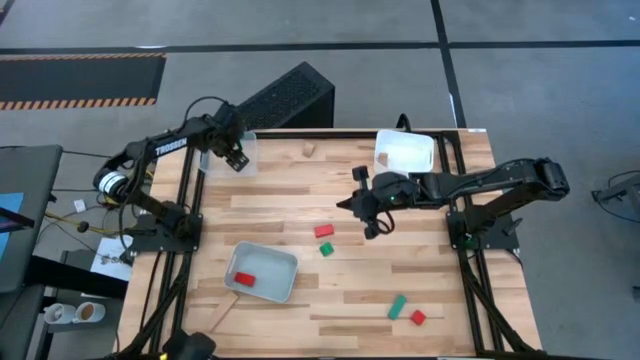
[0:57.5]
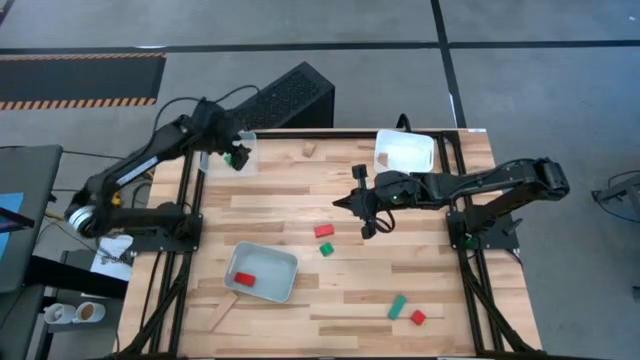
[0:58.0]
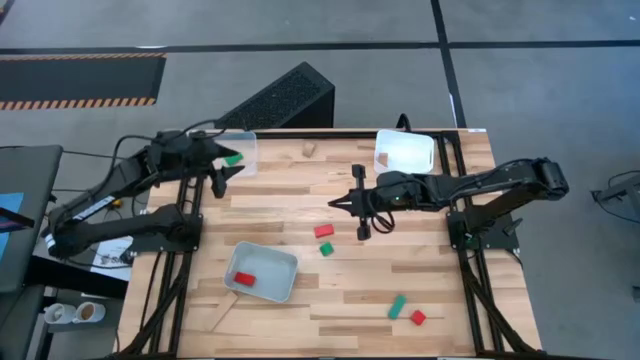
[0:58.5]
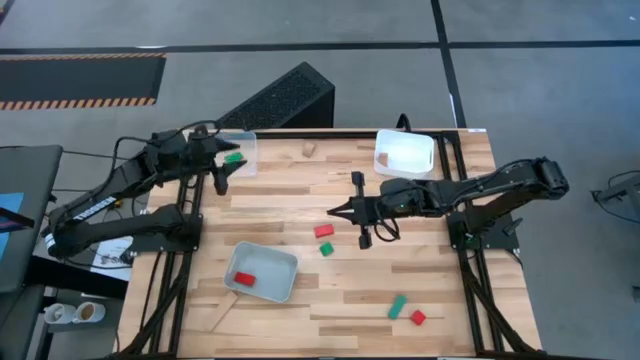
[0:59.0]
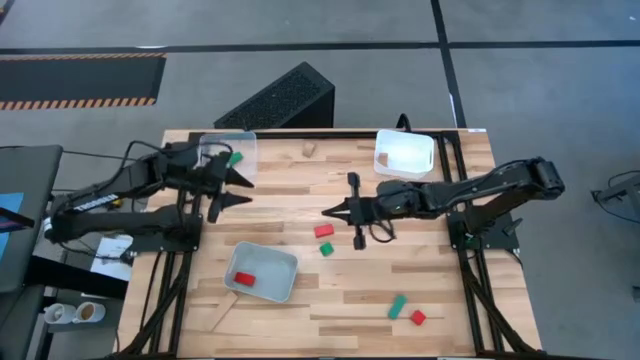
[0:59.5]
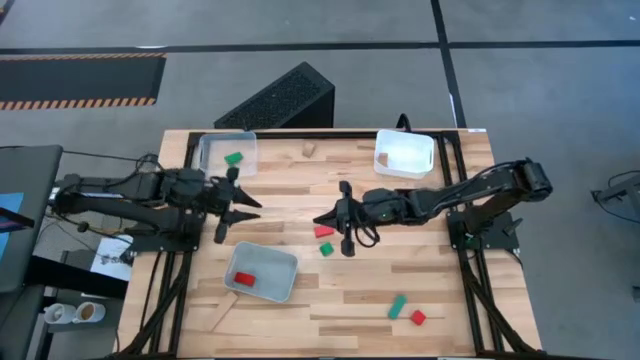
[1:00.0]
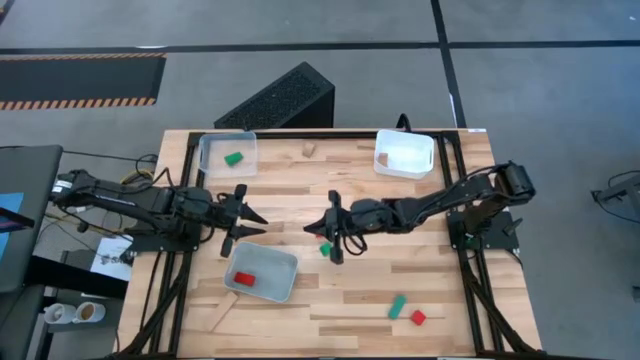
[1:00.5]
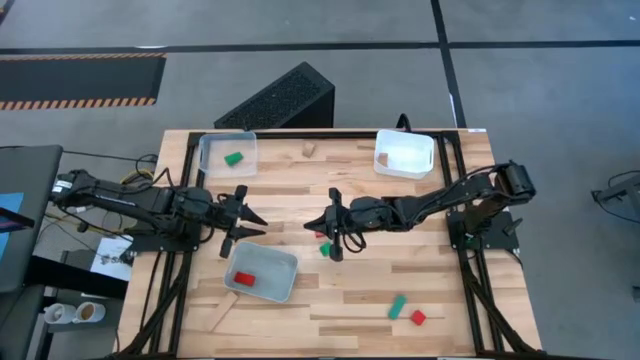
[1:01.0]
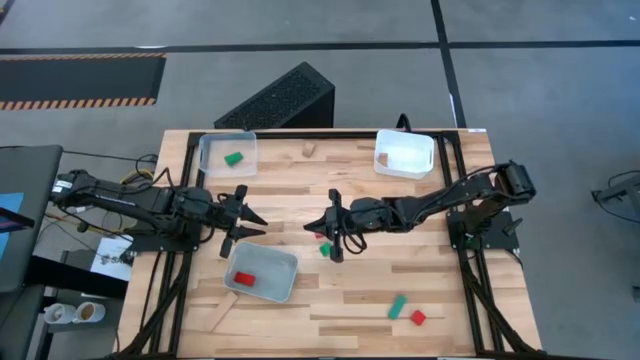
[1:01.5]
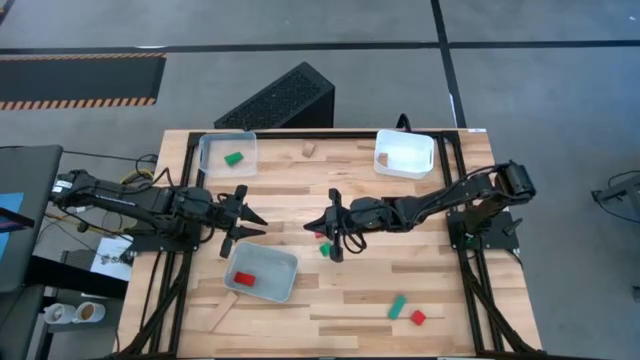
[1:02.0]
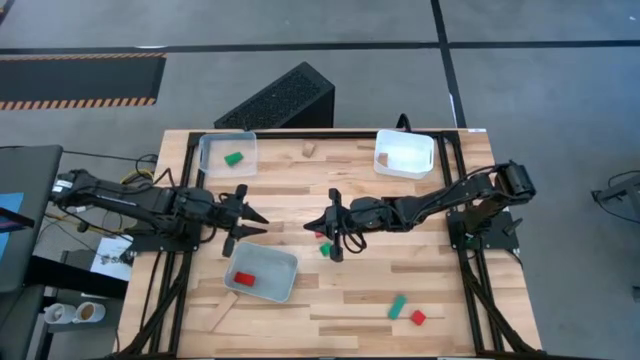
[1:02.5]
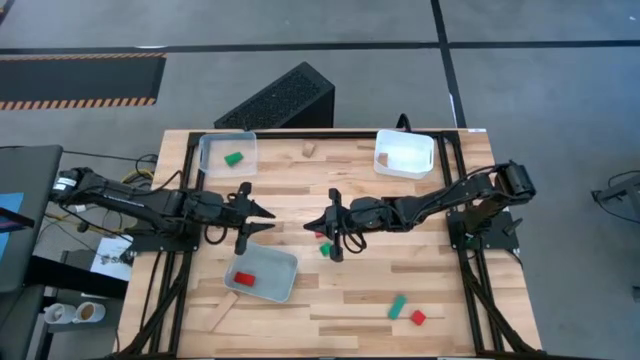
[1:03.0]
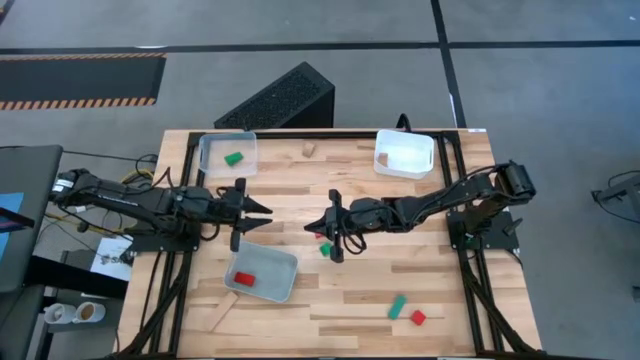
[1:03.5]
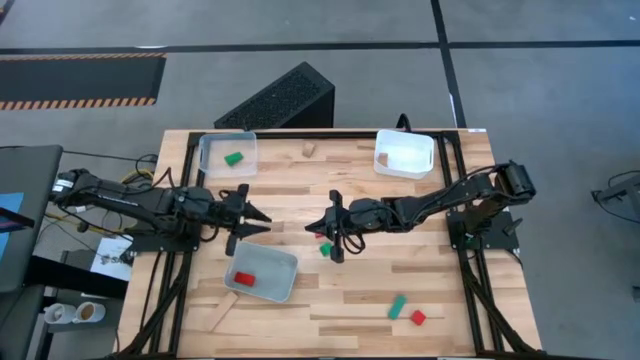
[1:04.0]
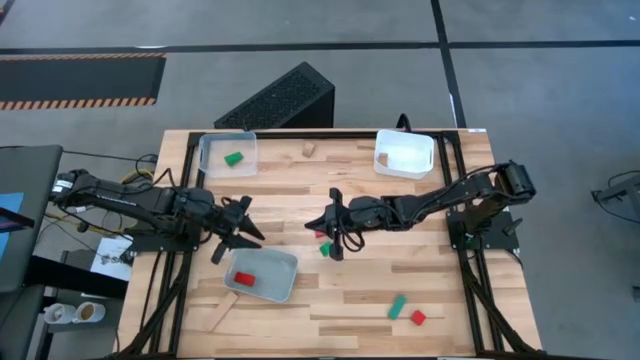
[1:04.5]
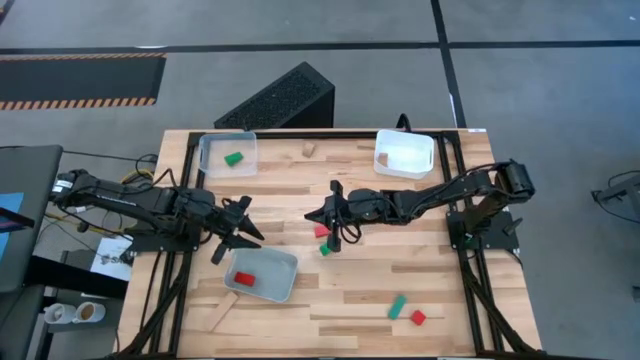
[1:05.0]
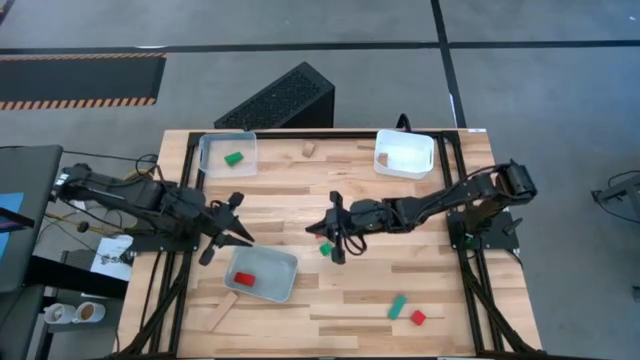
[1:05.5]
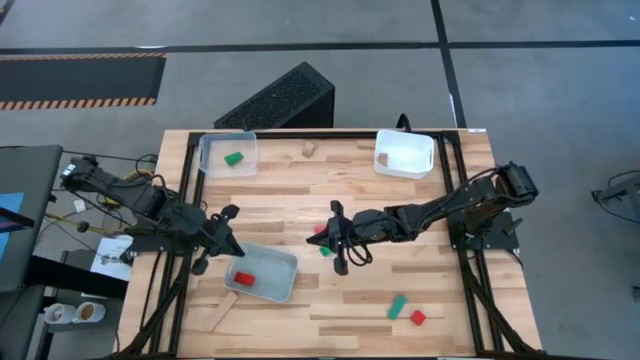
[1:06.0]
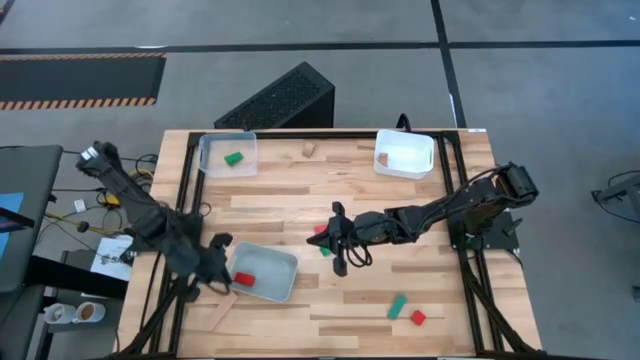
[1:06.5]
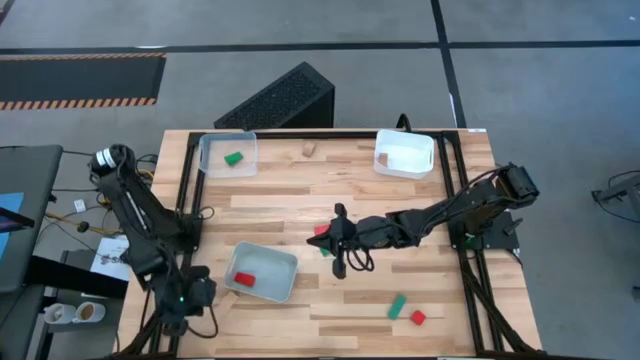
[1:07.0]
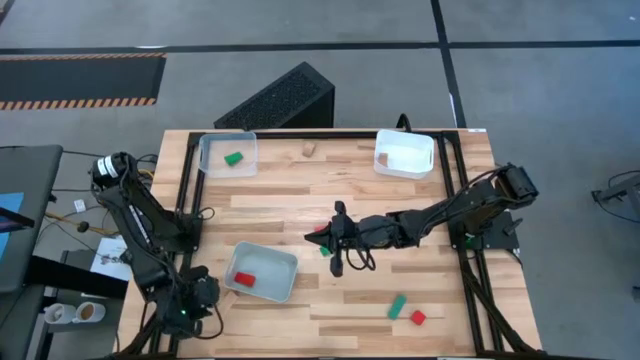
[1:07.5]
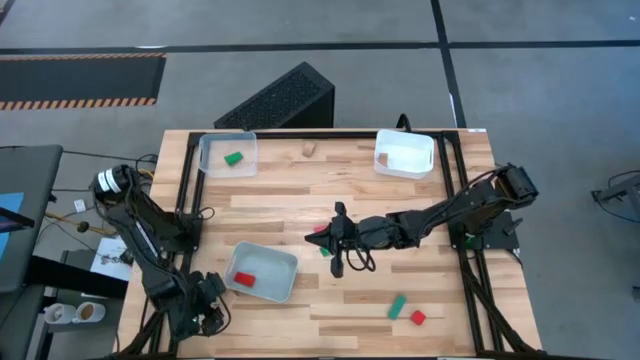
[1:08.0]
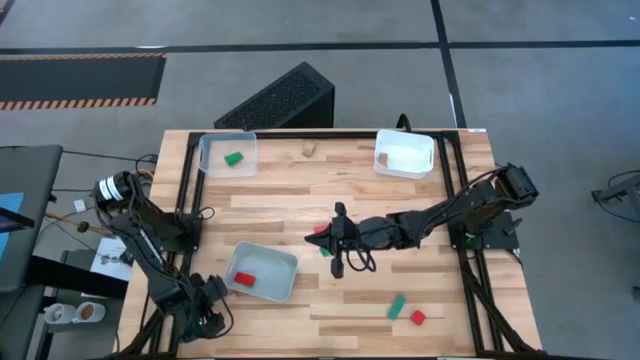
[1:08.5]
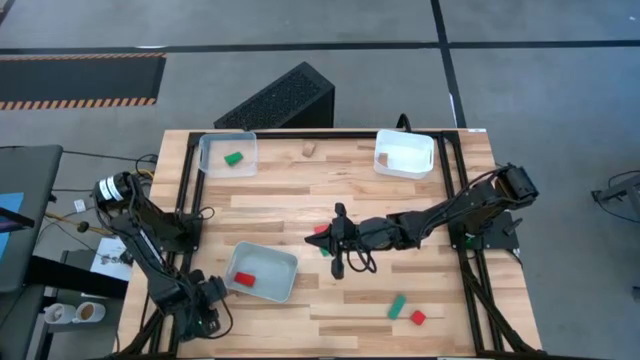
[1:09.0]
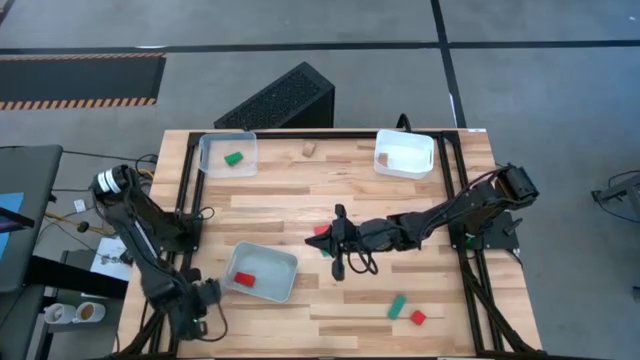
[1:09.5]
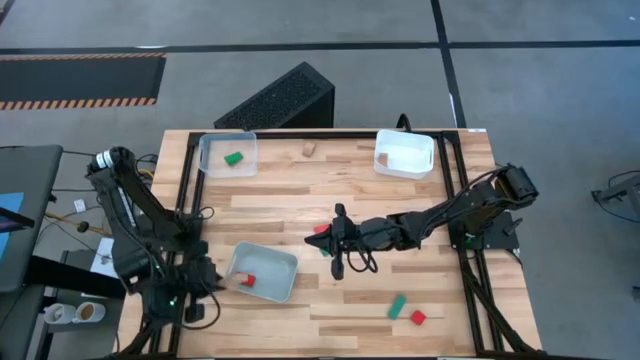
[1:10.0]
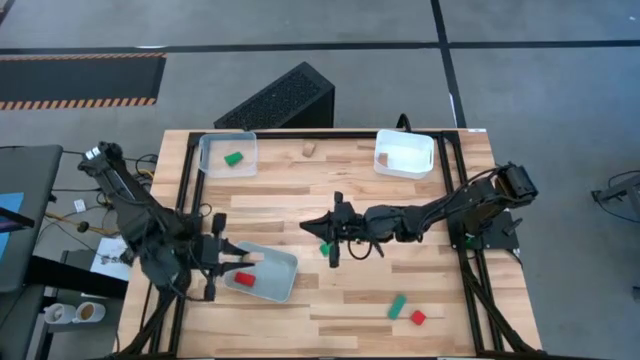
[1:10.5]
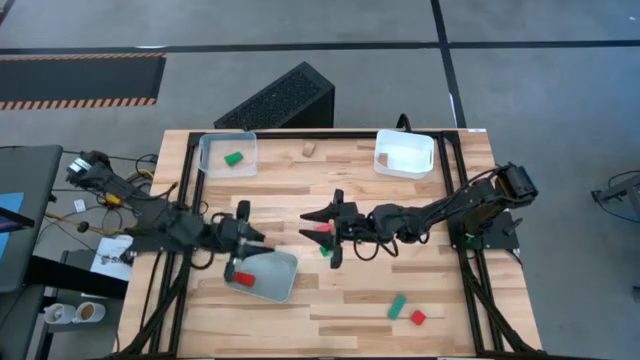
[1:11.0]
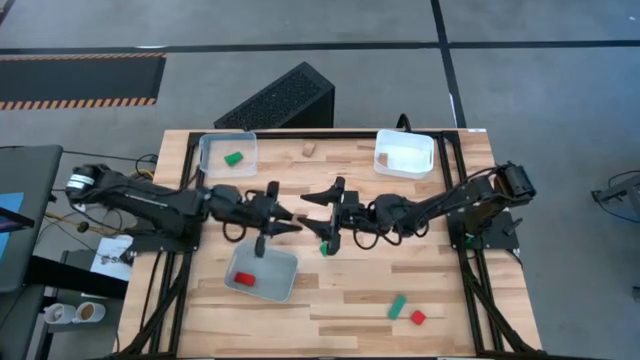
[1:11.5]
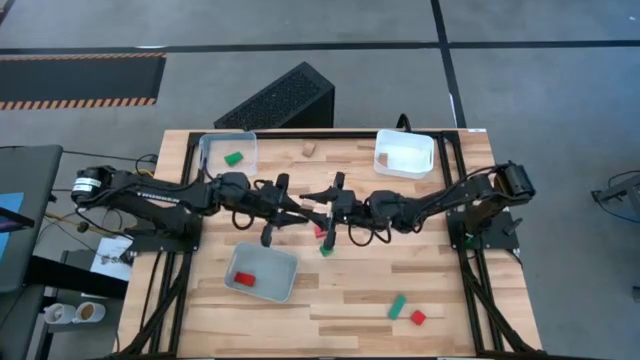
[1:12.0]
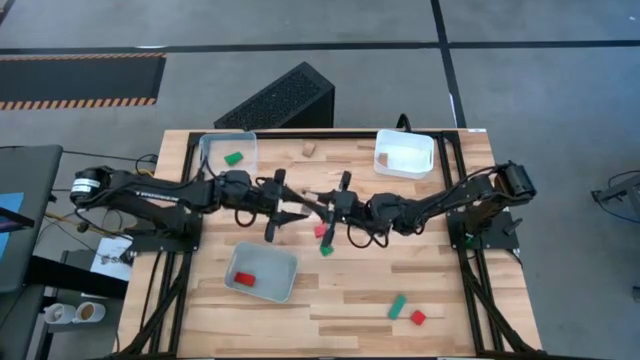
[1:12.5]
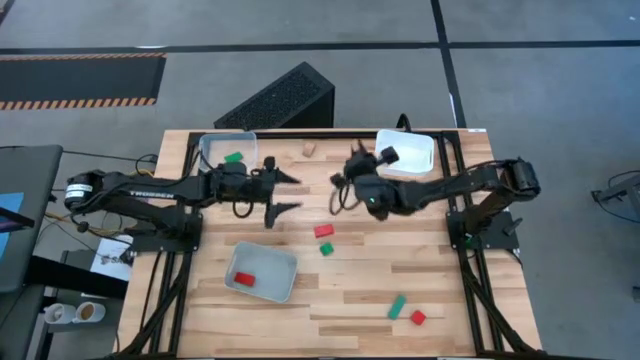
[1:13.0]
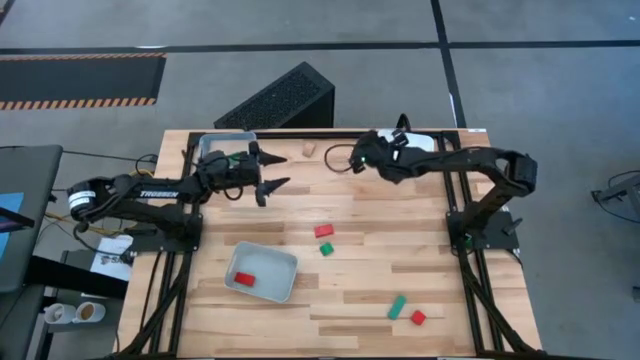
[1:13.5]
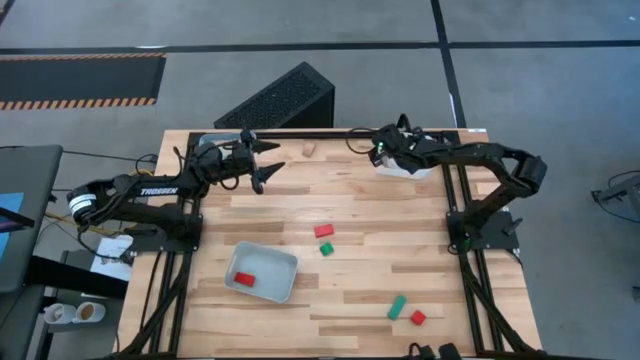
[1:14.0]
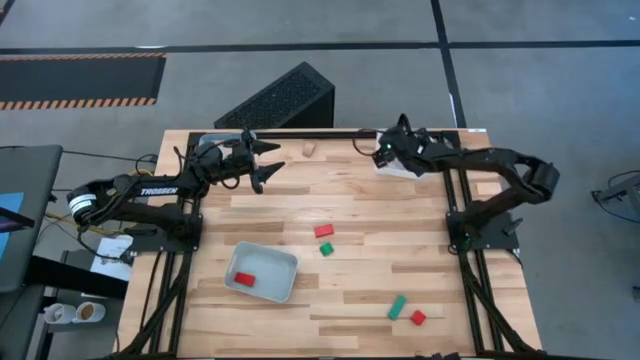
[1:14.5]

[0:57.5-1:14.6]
Task: Sort & place blocks by color
Put the bottom brown block into the white bin

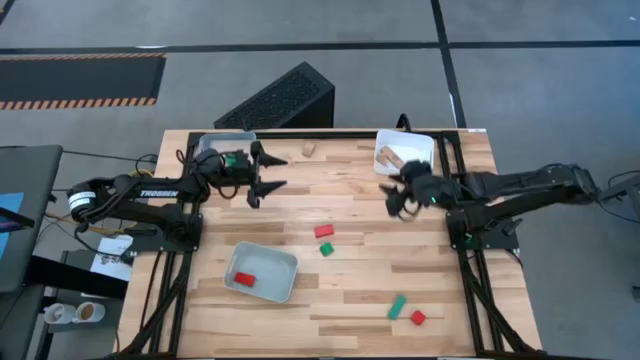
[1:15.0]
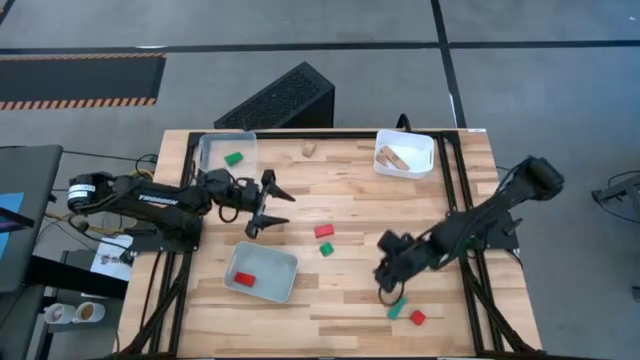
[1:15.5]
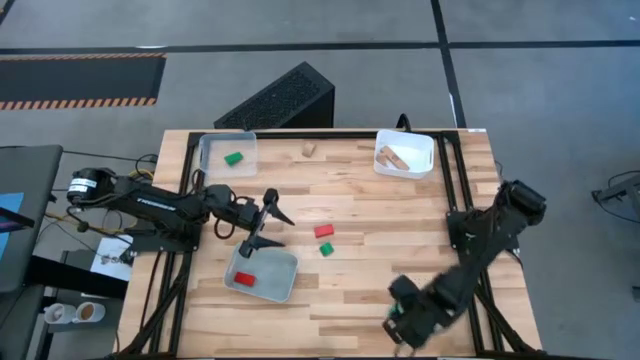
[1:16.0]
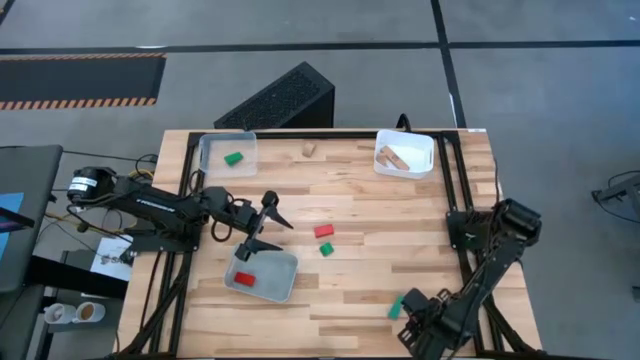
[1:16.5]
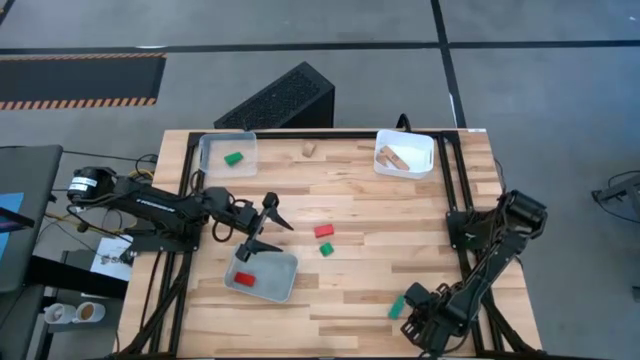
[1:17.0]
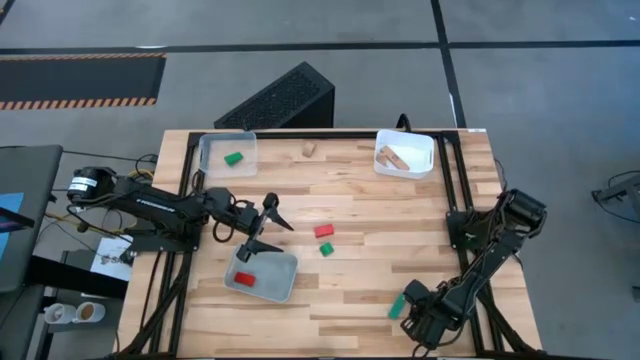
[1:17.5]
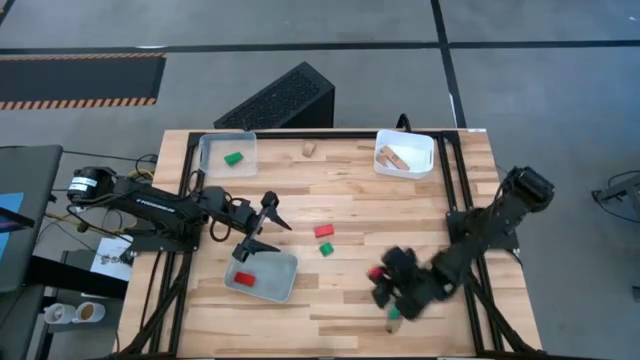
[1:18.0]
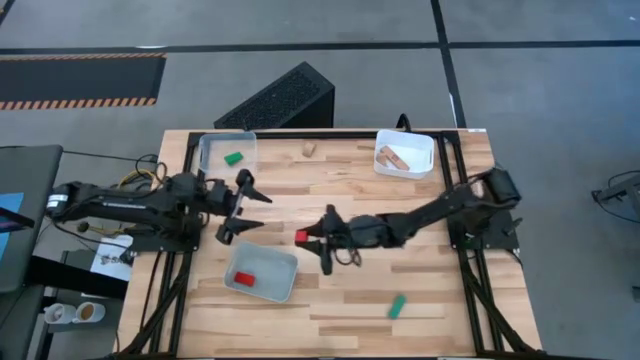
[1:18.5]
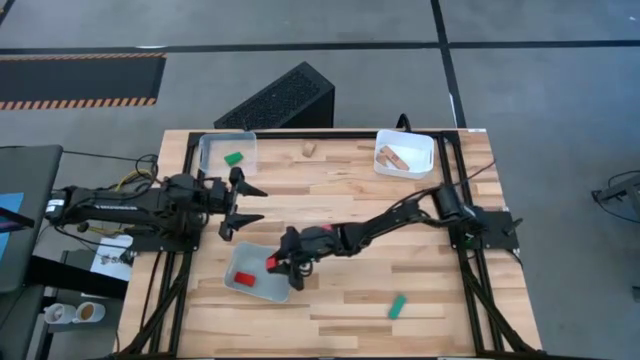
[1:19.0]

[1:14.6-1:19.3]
Put the bottom red block into the gray bin
